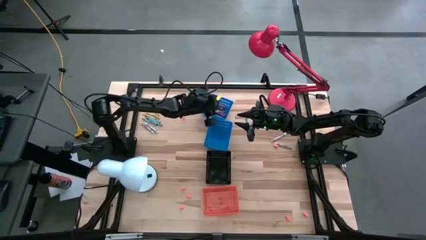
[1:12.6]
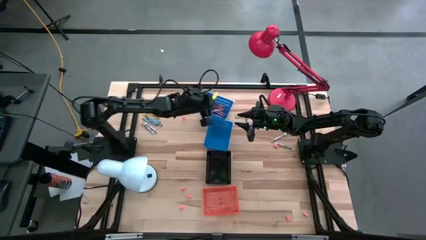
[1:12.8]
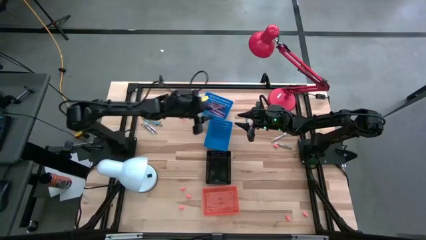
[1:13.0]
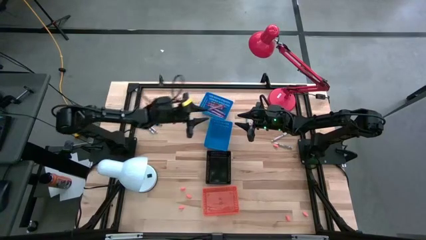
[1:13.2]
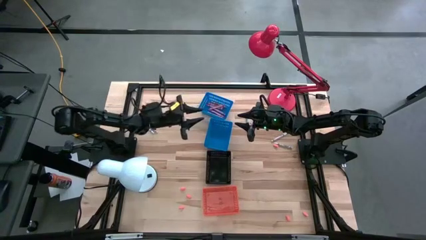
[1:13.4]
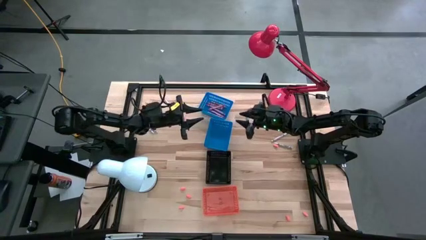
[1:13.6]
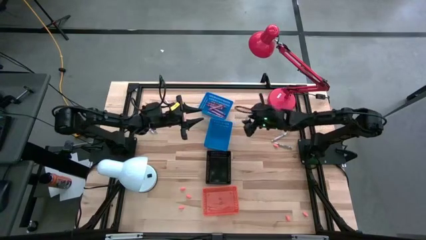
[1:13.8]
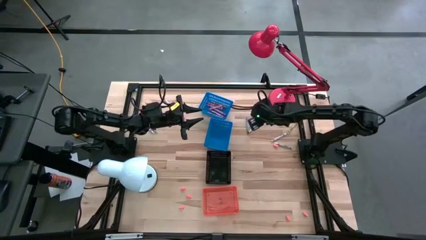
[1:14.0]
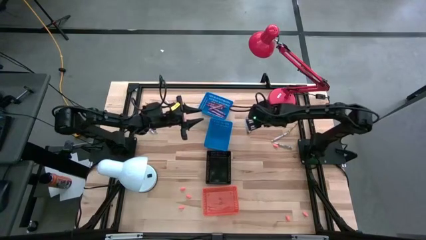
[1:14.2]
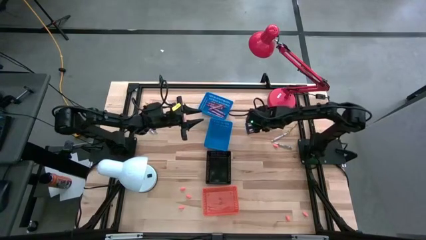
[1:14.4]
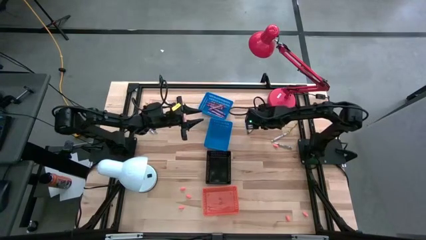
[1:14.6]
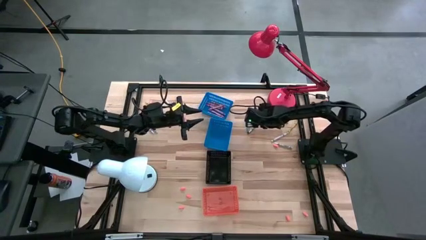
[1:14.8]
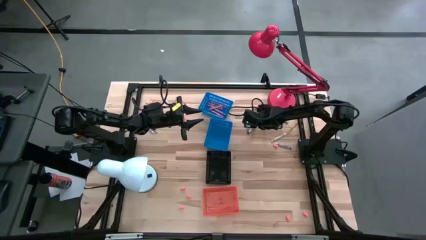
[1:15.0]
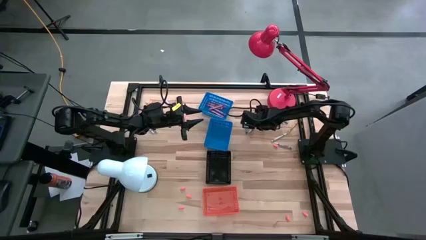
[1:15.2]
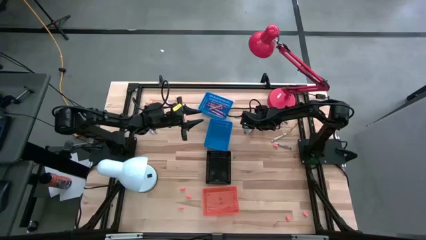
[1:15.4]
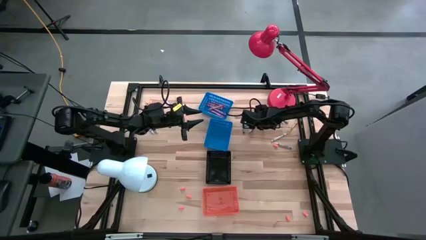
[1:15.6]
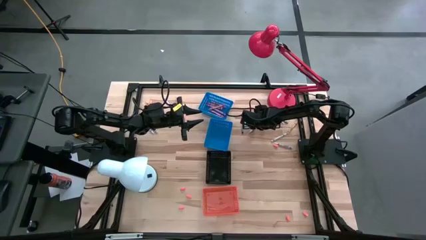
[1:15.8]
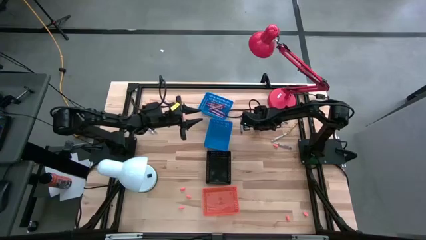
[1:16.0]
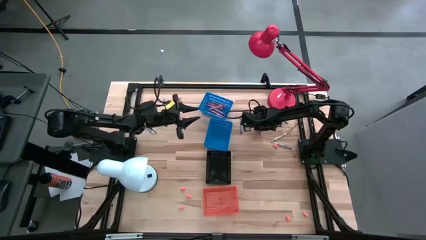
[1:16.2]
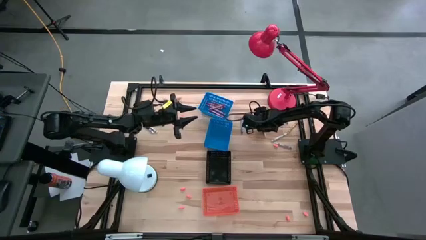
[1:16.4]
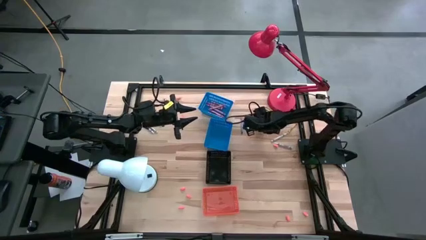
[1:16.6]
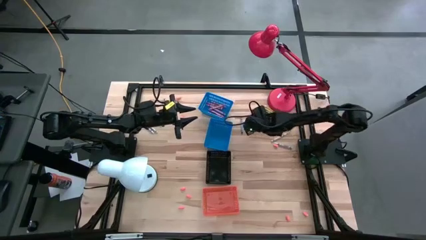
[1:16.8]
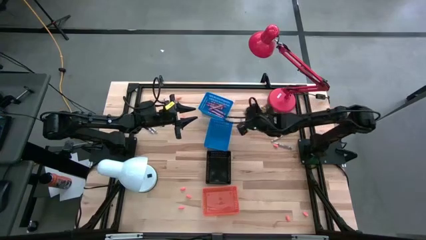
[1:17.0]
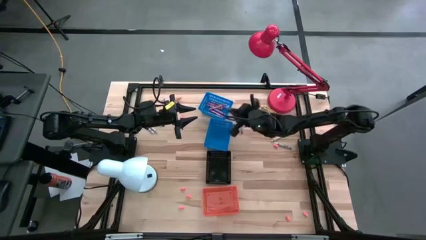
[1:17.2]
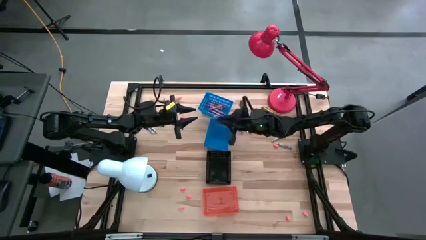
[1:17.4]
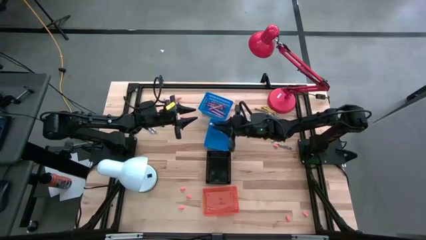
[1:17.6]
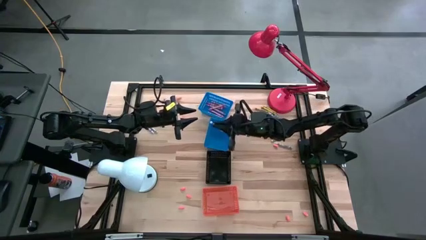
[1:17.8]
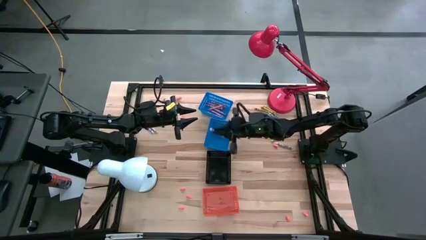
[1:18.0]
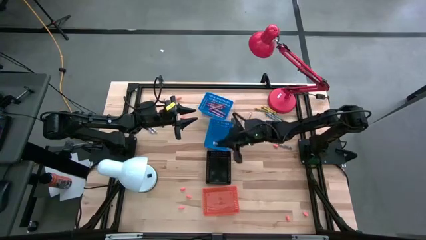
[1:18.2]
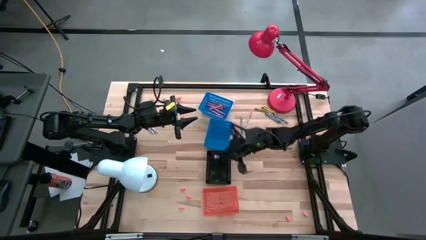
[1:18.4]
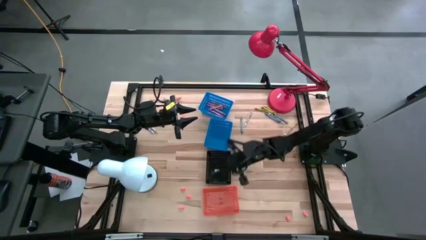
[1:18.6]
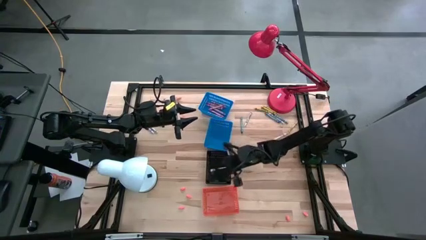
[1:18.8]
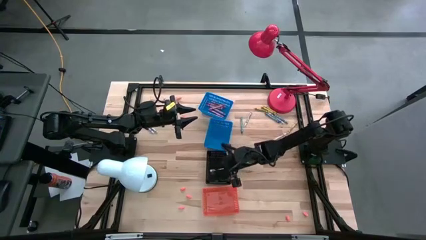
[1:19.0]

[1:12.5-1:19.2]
Task: Sort crayons
Put the white crayon into the black bin

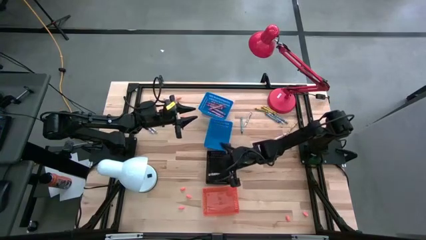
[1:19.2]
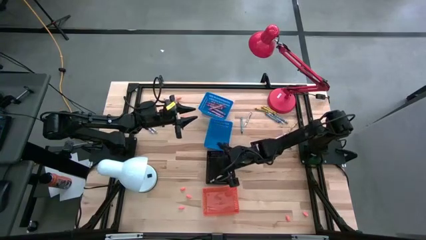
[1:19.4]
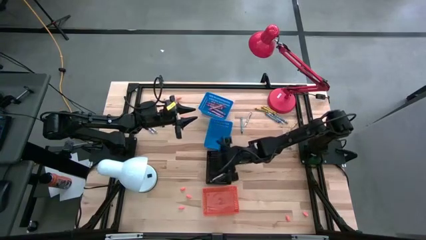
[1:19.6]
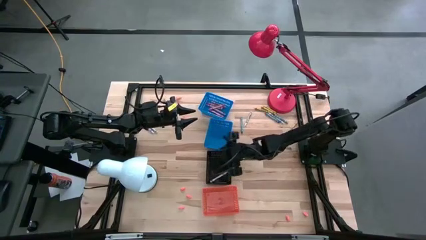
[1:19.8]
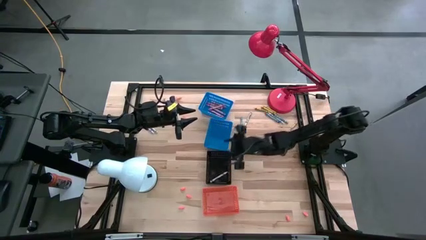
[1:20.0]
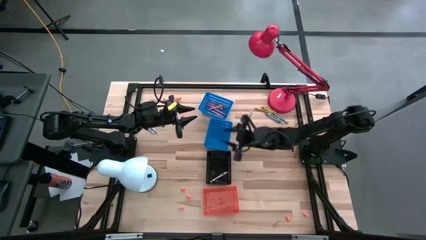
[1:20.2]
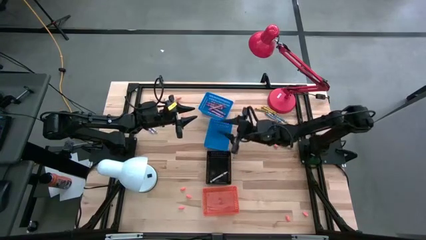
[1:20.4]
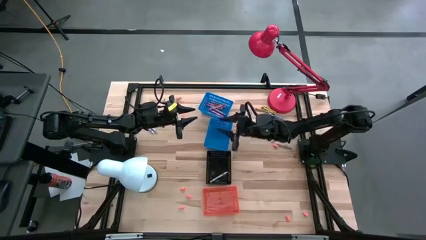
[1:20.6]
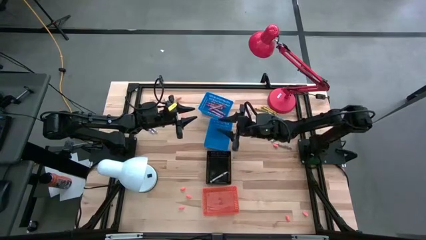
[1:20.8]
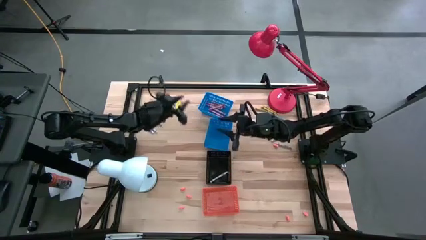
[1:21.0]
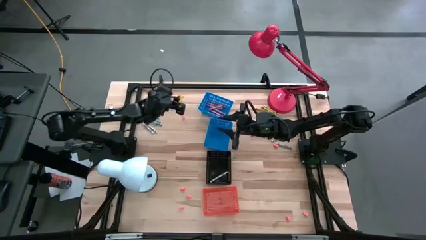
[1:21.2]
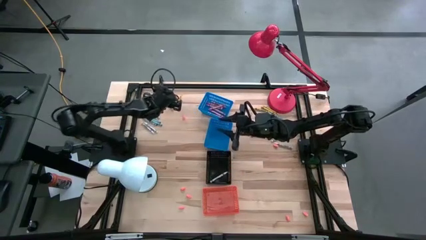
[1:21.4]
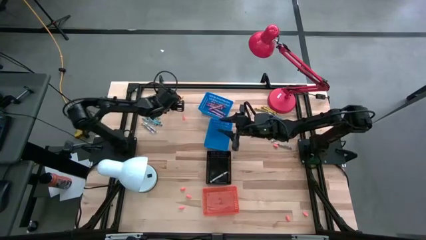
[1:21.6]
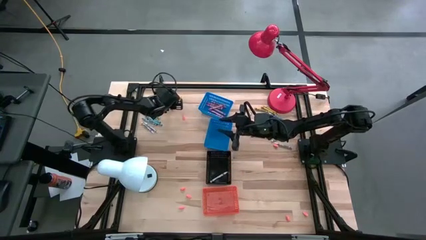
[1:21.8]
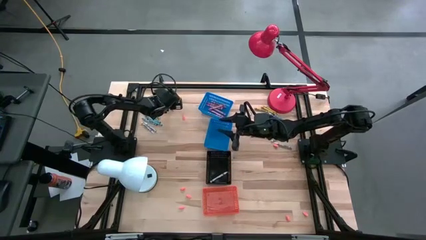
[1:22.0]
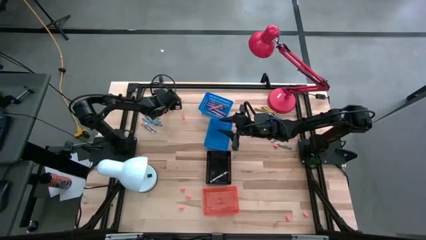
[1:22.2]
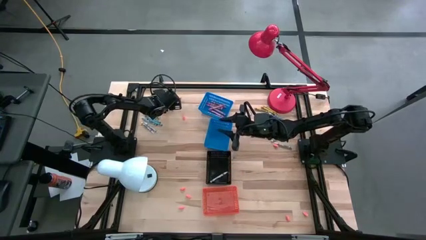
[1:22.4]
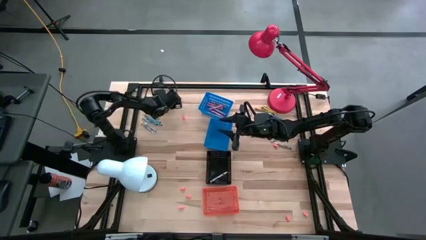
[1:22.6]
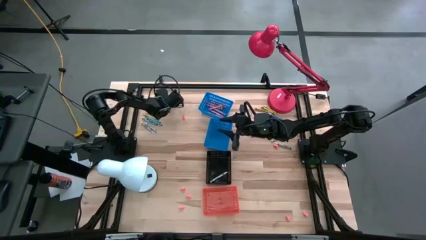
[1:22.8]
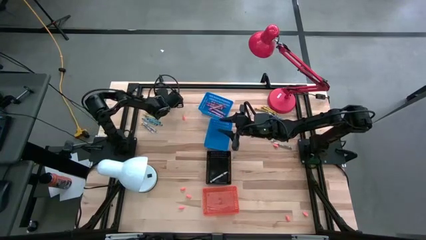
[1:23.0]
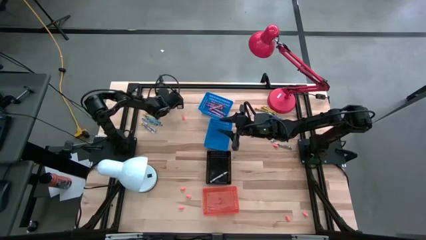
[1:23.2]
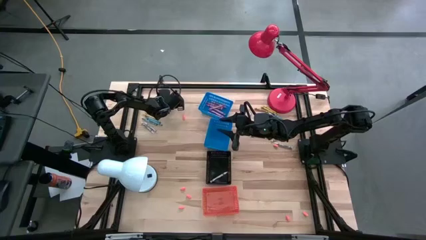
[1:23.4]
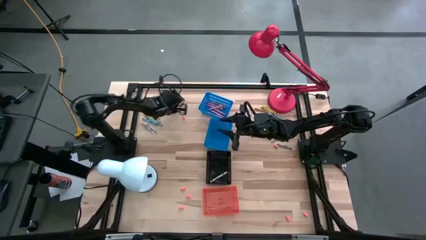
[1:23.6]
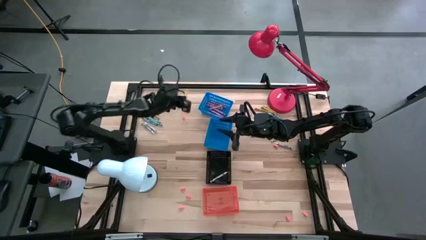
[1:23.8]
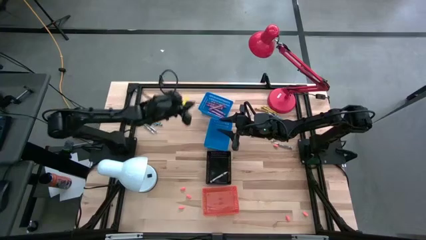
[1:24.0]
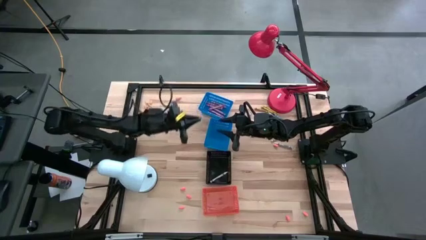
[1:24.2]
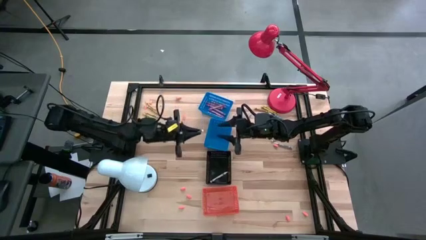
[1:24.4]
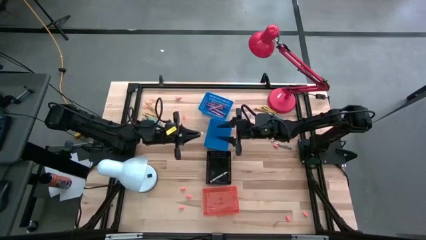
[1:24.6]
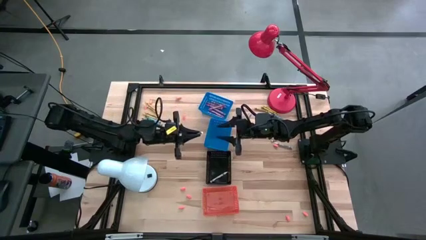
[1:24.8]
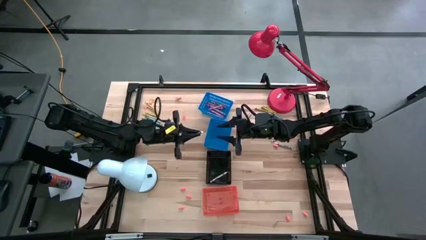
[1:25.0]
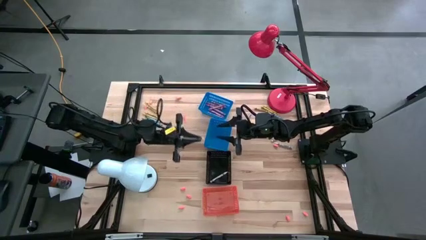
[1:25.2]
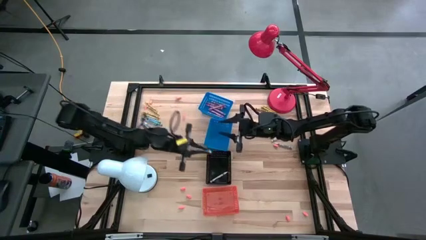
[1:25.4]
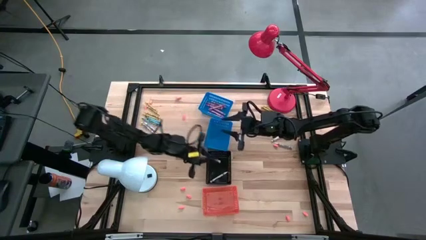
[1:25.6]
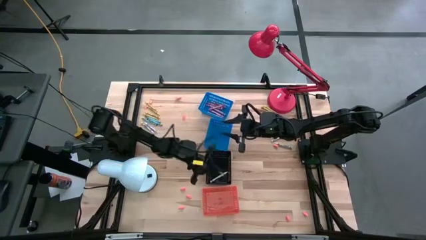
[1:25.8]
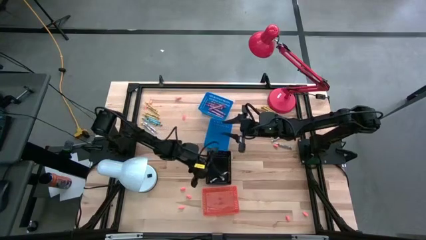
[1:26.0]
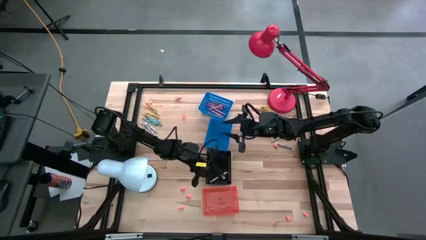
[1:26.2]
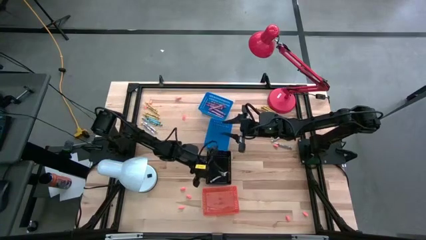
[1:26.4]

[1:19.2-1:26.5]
Put the white crayon into the black bin
